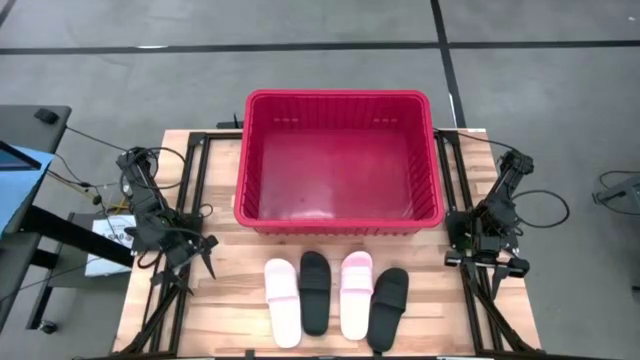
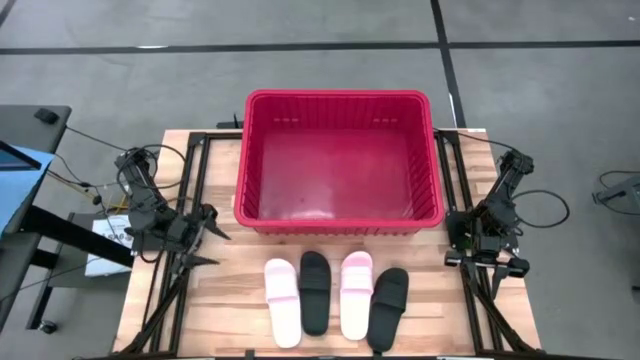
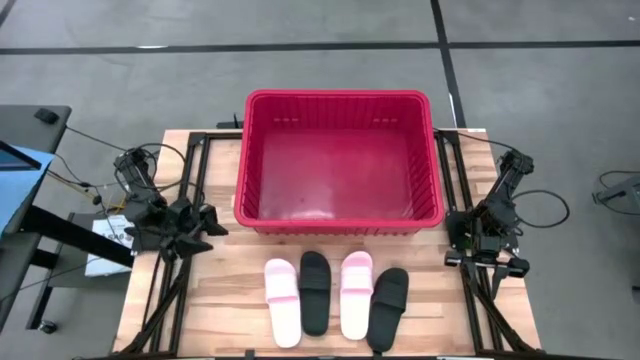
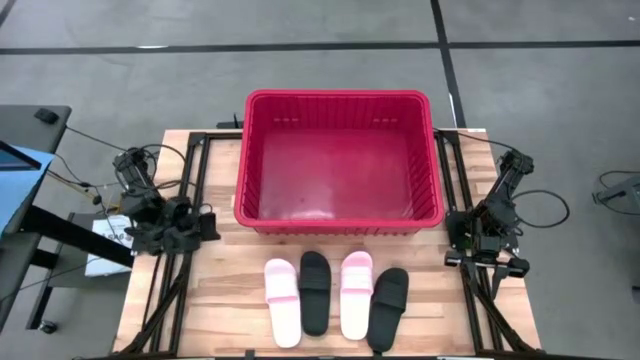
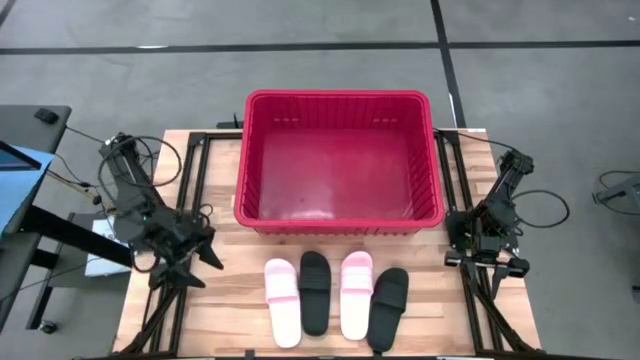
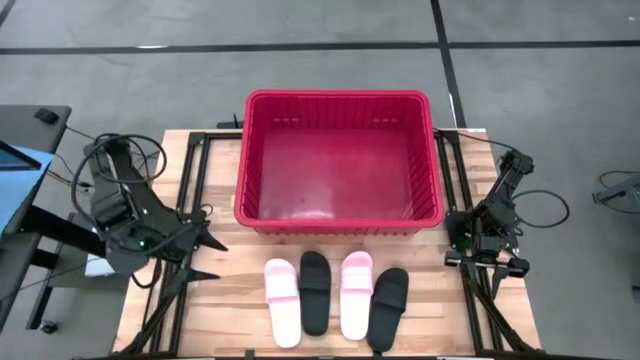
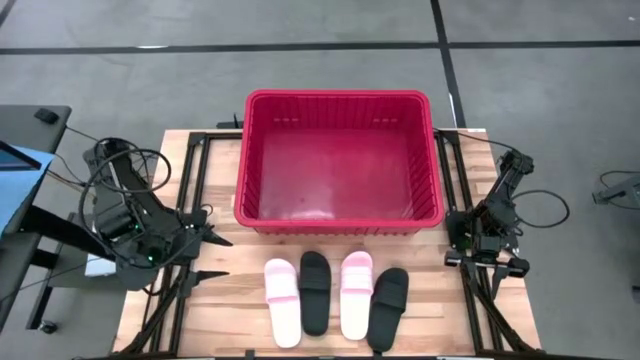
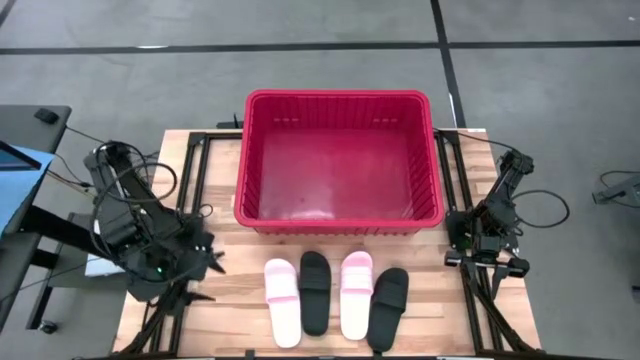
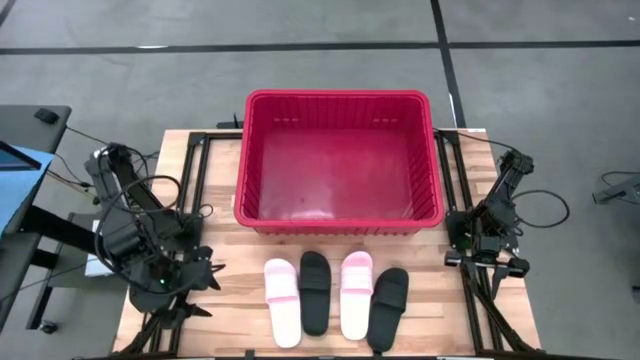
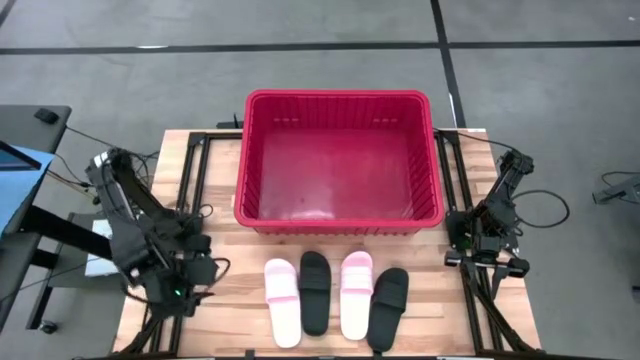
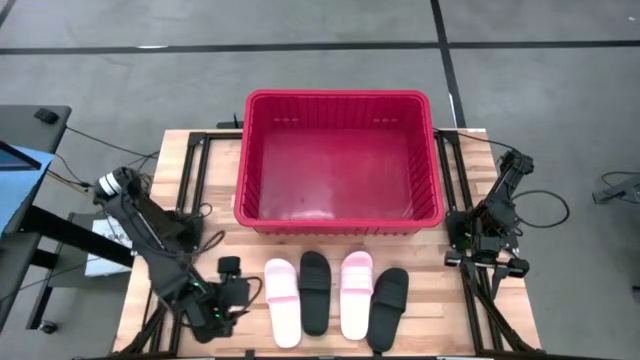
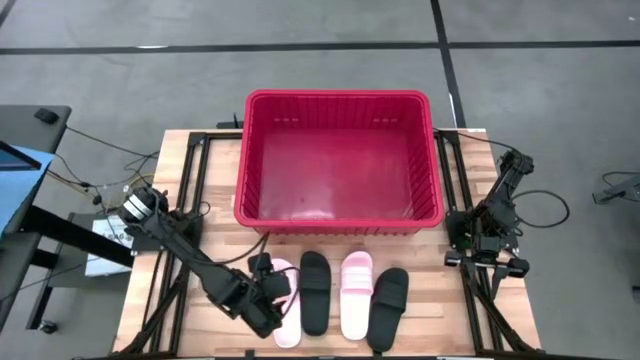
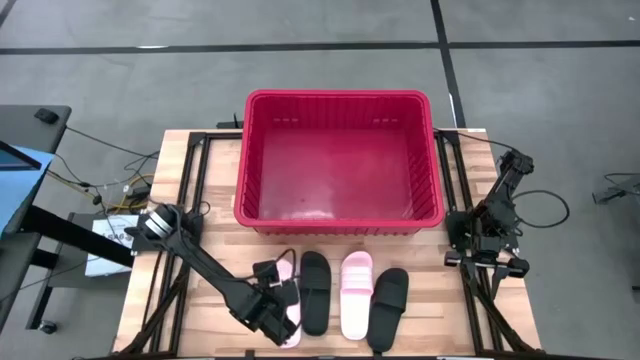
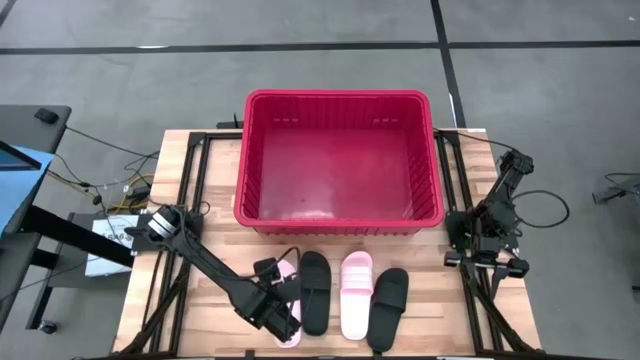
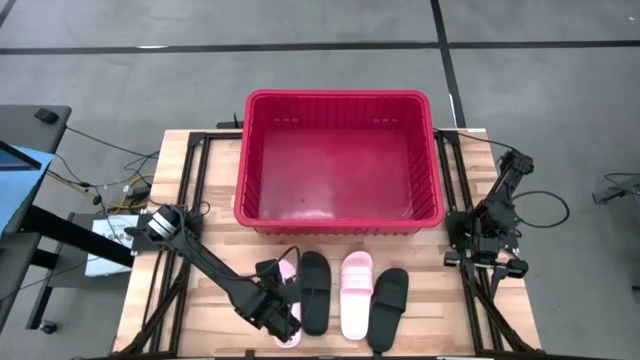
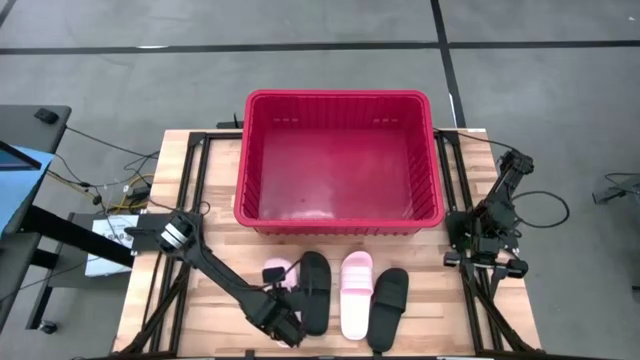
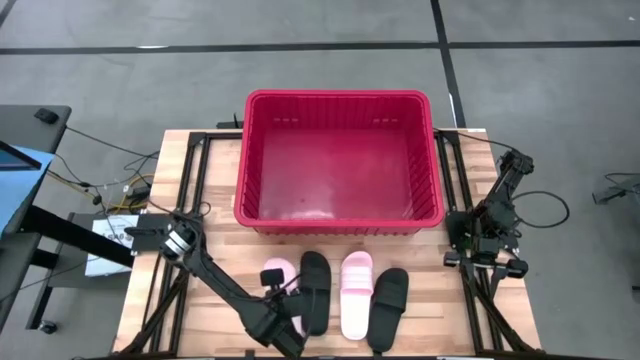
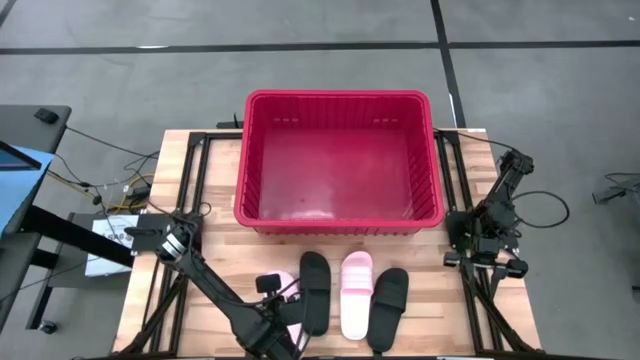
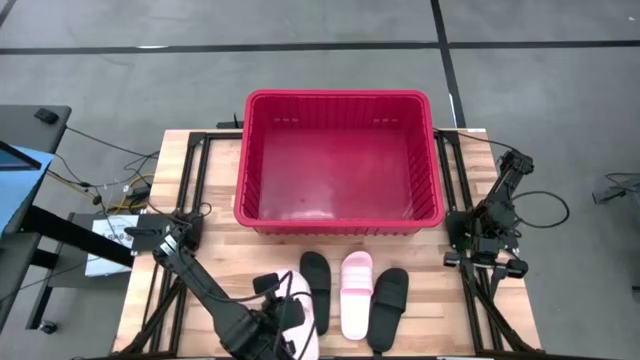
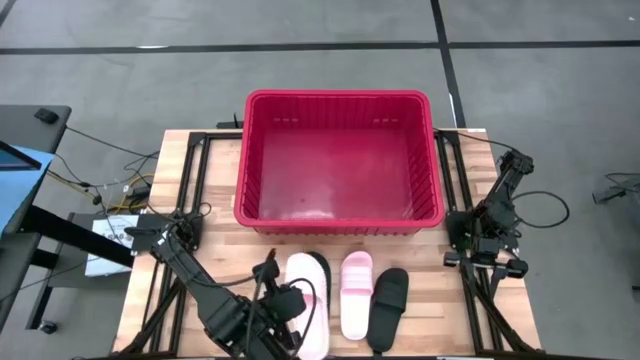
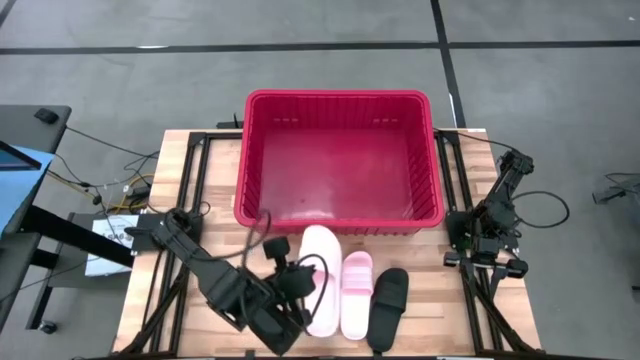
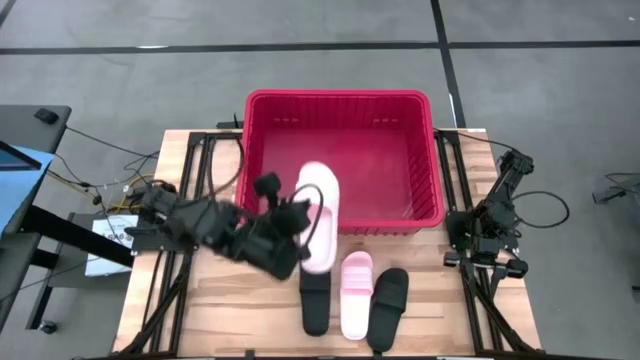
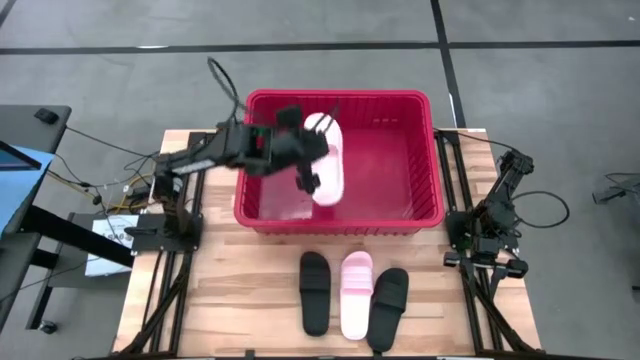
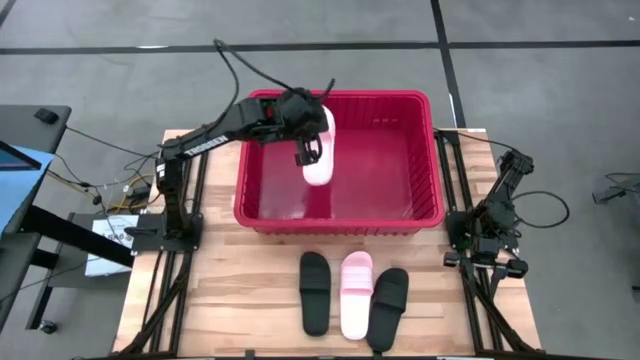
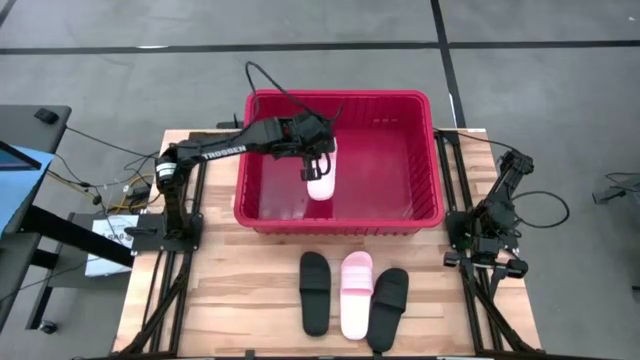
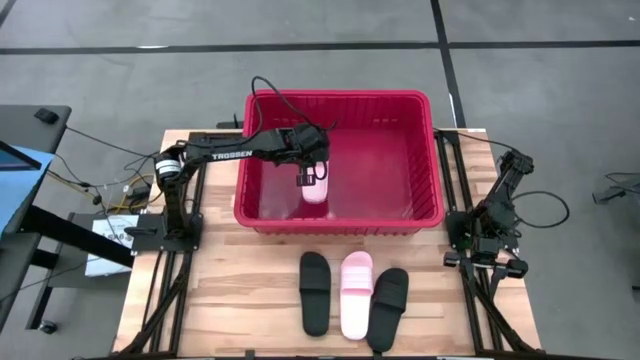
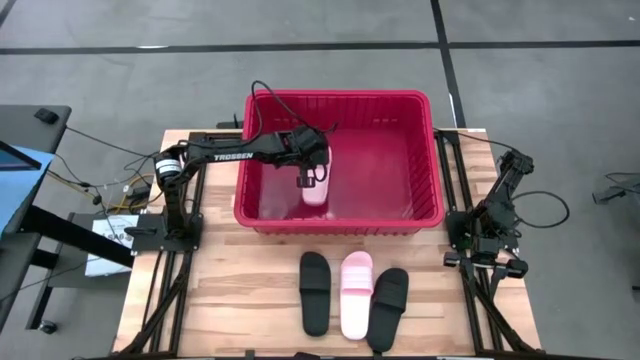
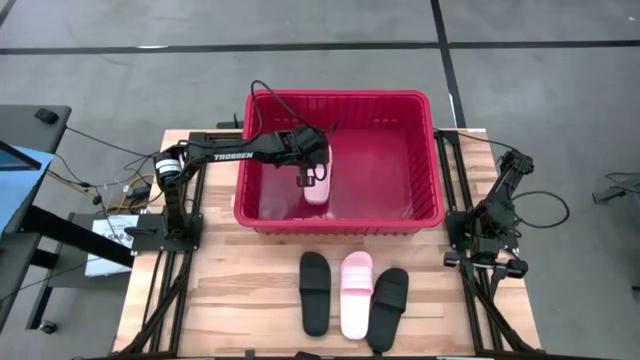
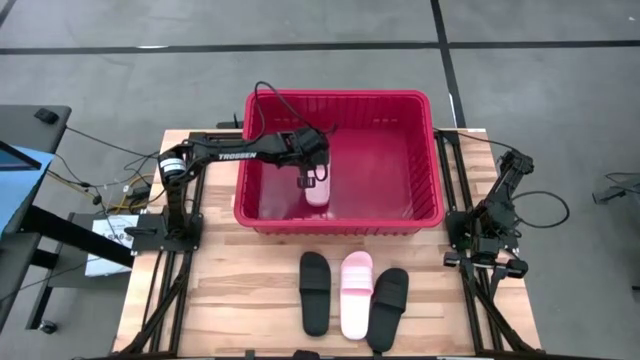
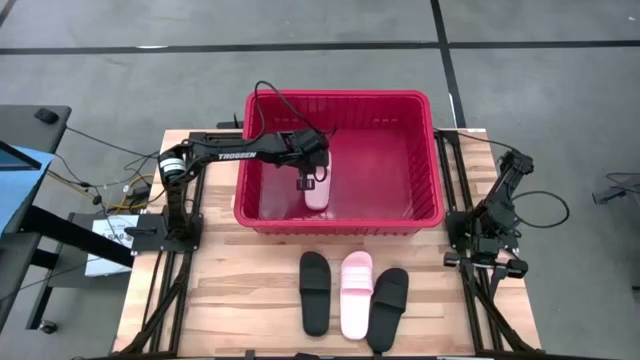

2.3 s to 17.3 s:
Task: Pick and place slides into bin
Put the left pink slide into the red bin

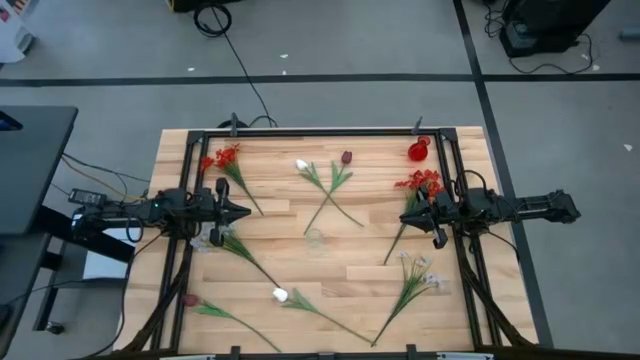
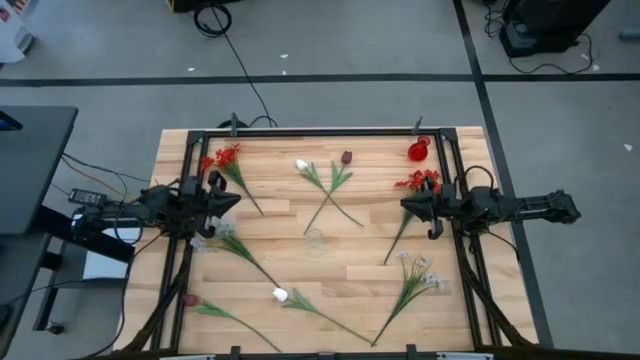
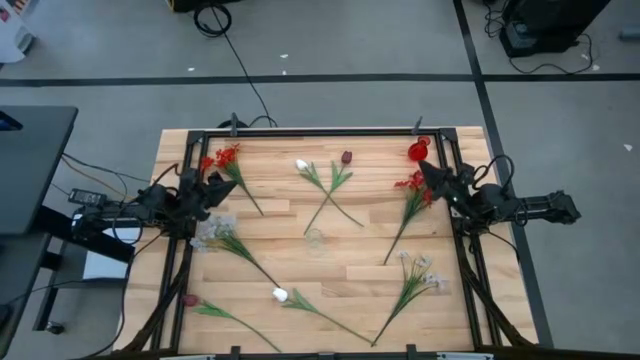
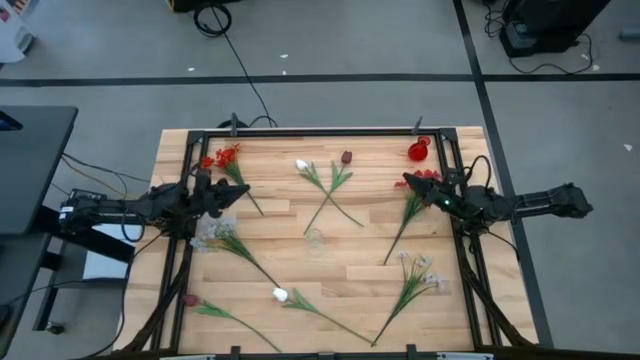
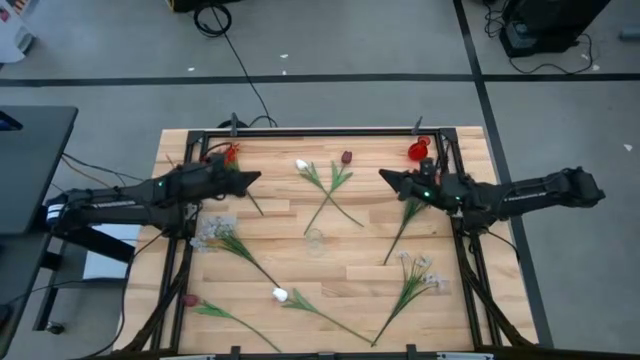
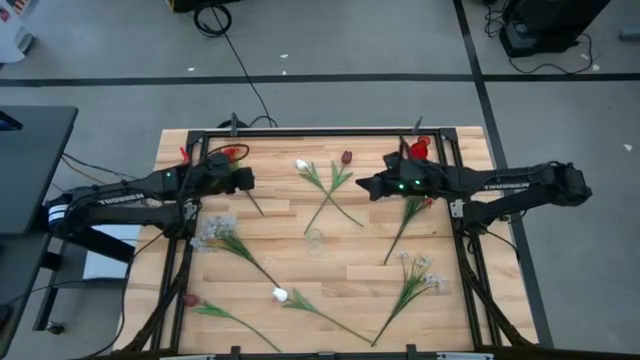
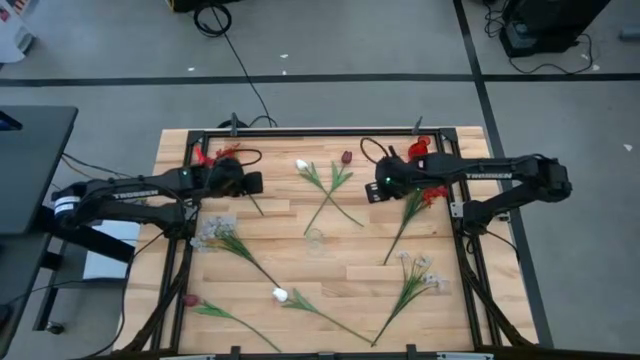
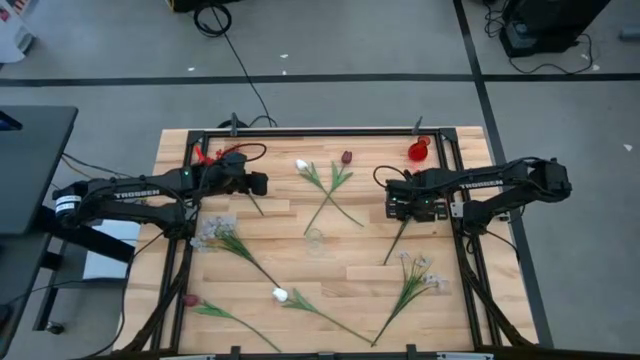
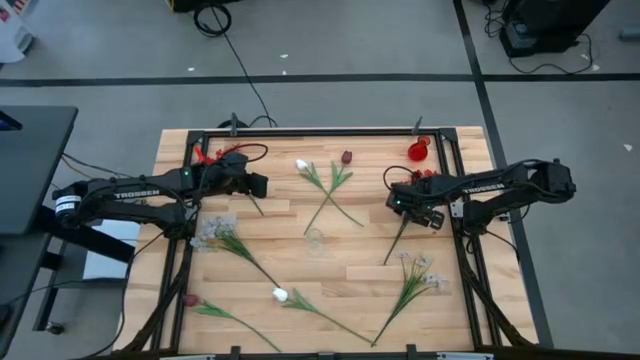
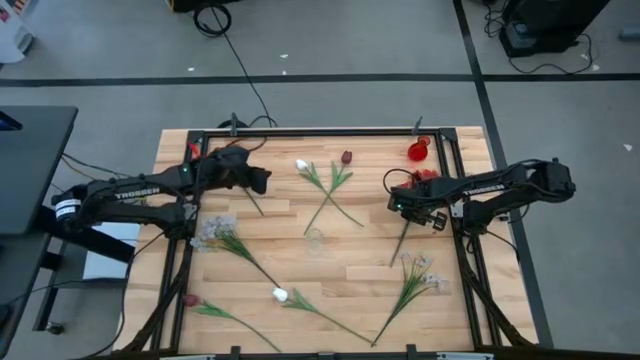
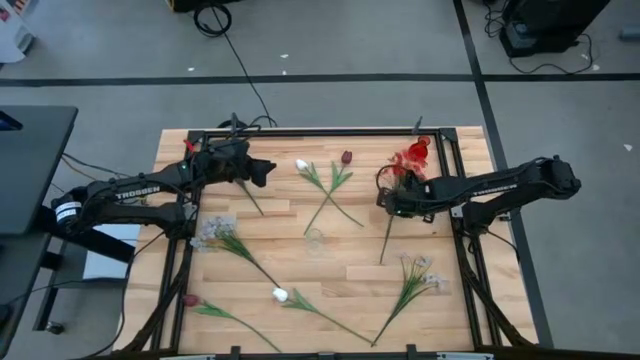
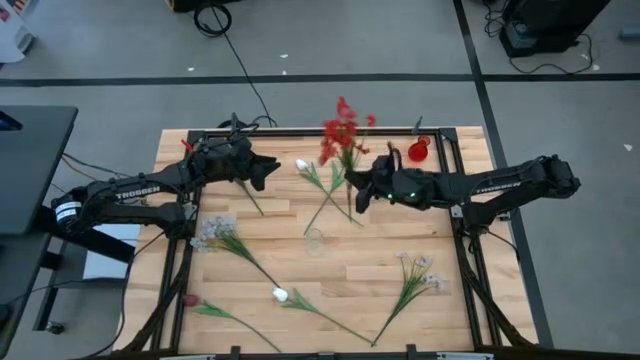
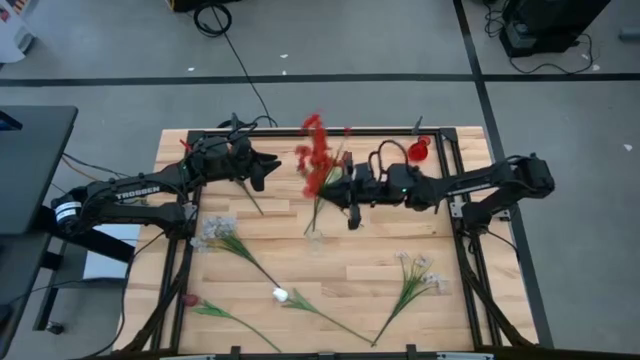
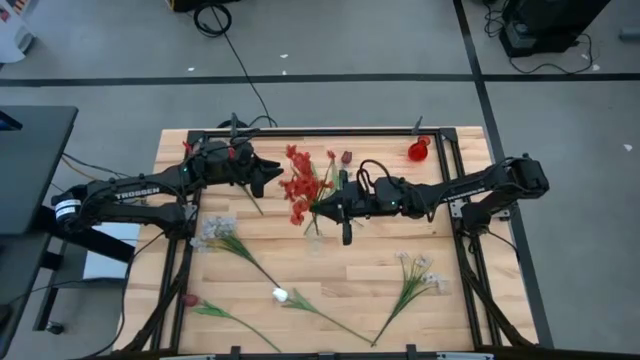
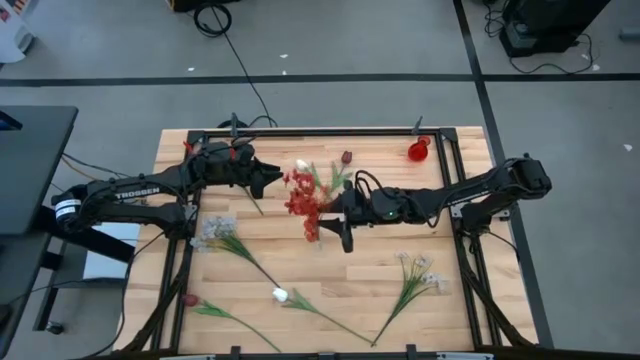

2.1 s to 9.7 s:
Task: Sort flowers into vase by color
Put the bottom red flowers into the transparent vase
